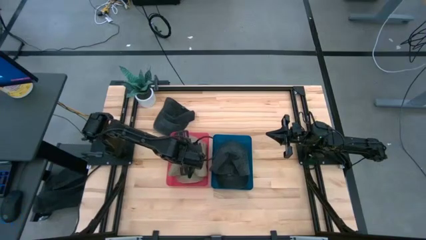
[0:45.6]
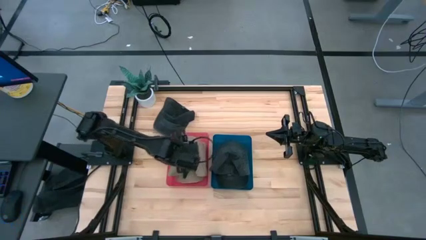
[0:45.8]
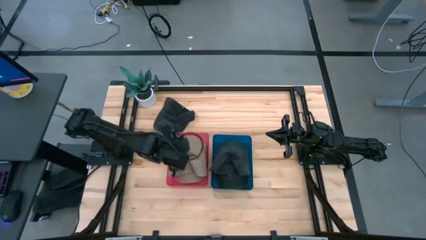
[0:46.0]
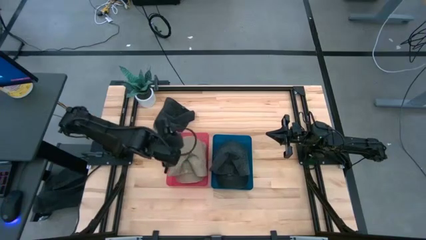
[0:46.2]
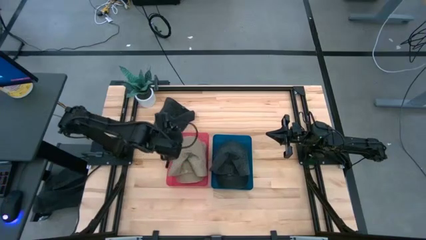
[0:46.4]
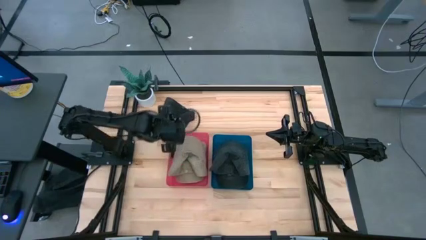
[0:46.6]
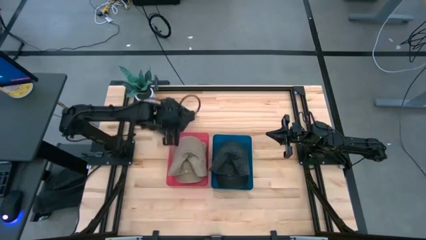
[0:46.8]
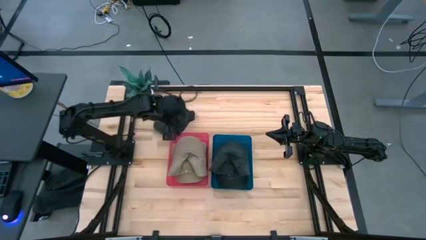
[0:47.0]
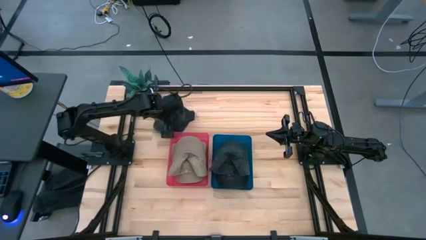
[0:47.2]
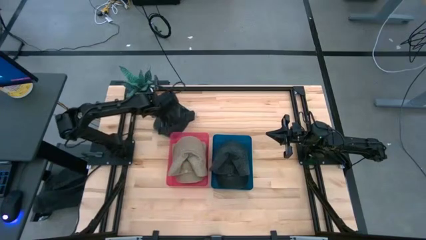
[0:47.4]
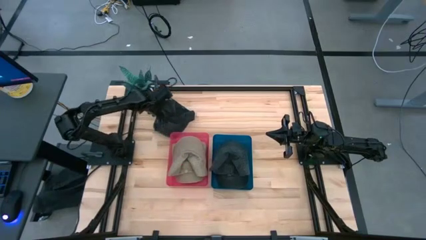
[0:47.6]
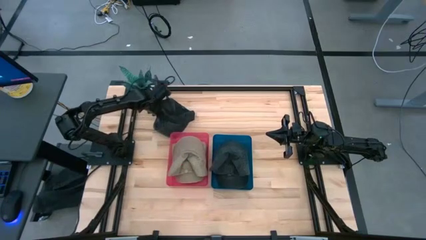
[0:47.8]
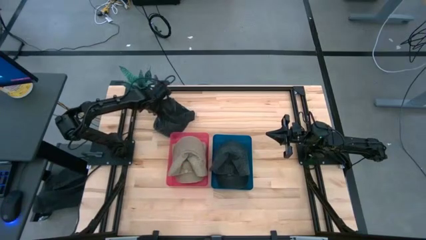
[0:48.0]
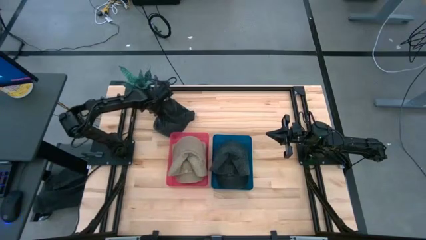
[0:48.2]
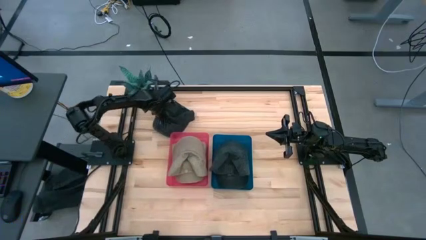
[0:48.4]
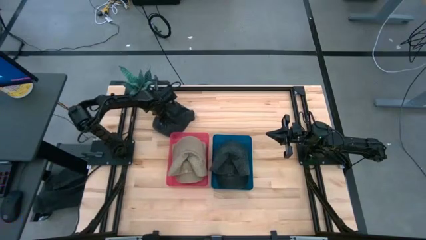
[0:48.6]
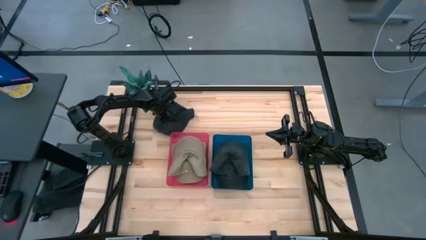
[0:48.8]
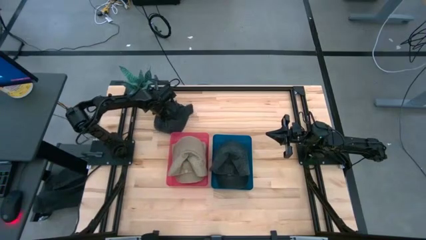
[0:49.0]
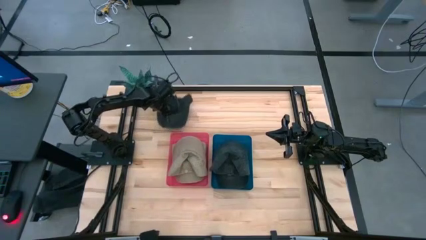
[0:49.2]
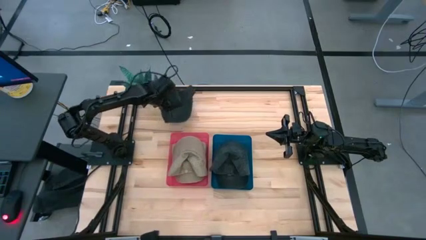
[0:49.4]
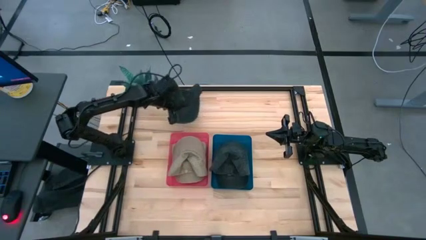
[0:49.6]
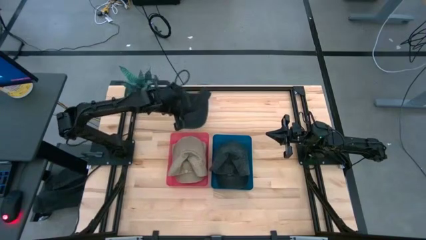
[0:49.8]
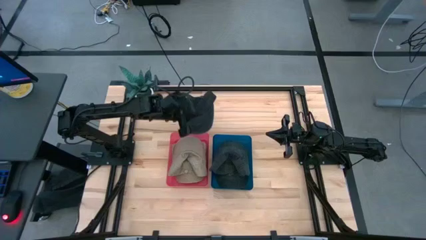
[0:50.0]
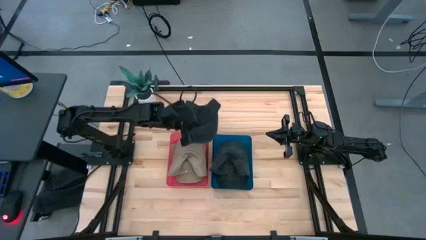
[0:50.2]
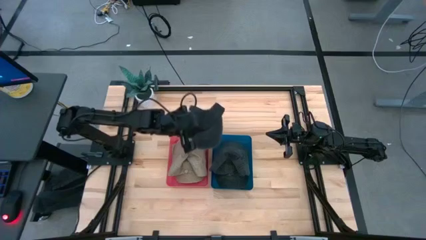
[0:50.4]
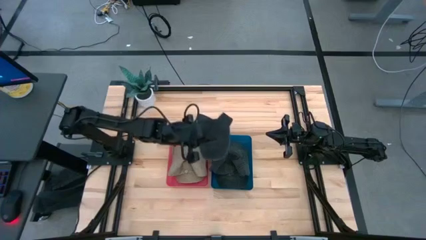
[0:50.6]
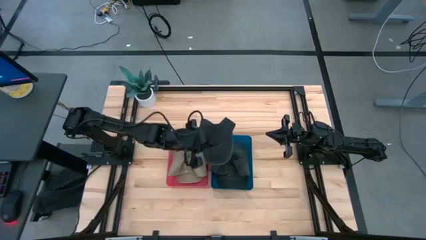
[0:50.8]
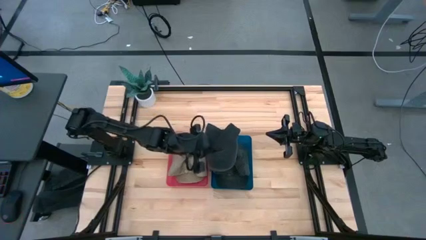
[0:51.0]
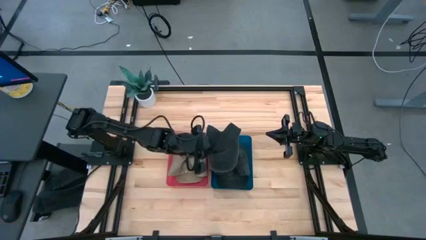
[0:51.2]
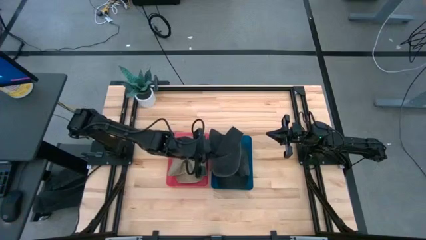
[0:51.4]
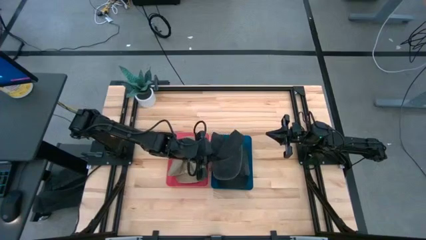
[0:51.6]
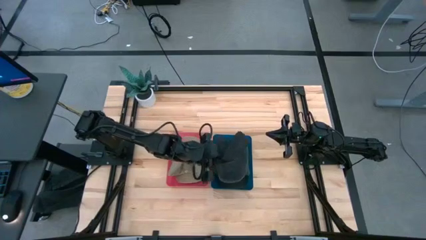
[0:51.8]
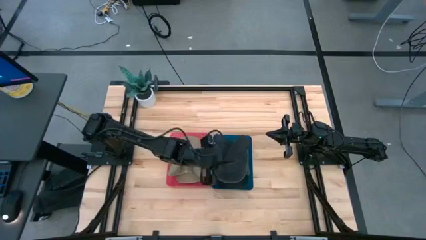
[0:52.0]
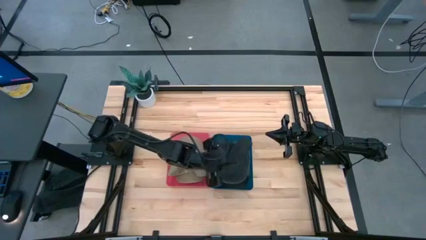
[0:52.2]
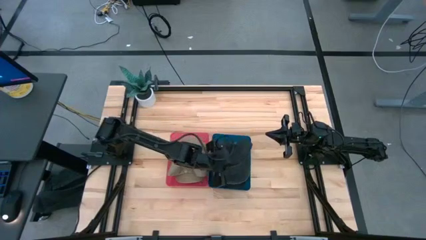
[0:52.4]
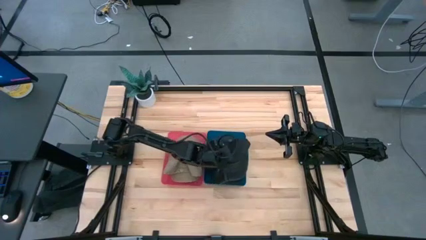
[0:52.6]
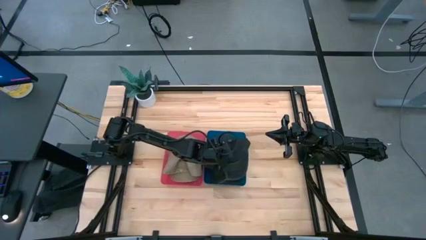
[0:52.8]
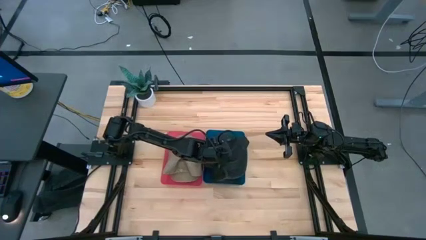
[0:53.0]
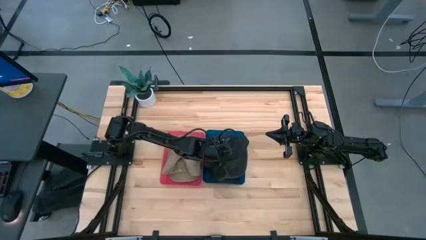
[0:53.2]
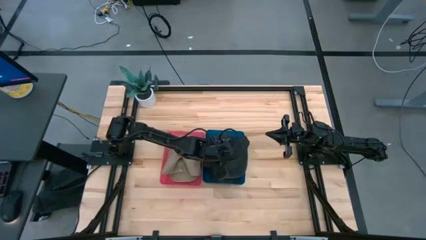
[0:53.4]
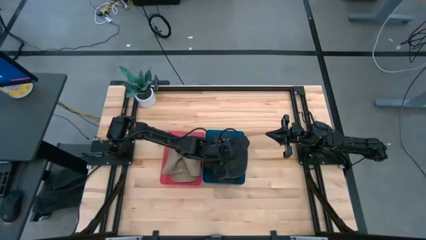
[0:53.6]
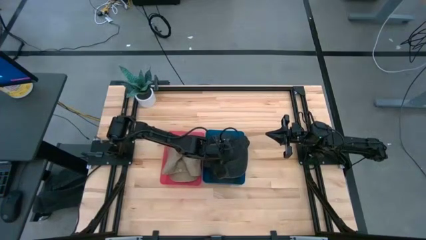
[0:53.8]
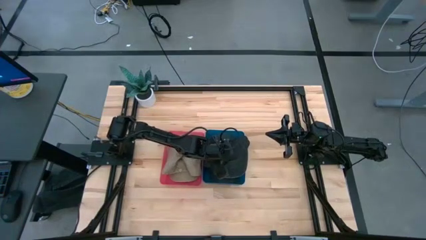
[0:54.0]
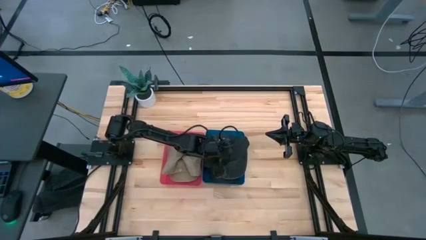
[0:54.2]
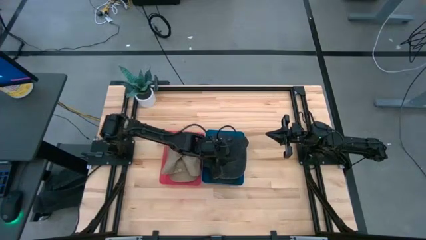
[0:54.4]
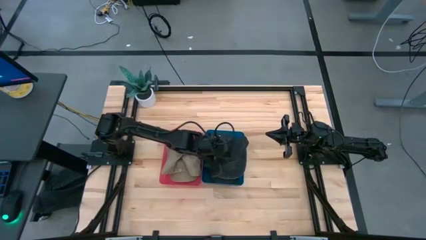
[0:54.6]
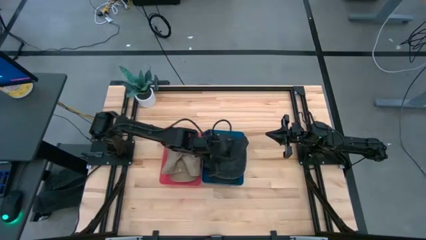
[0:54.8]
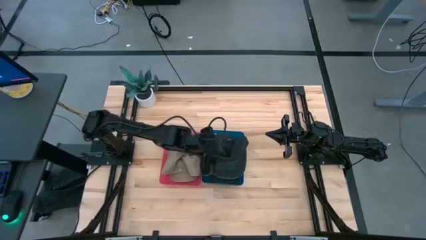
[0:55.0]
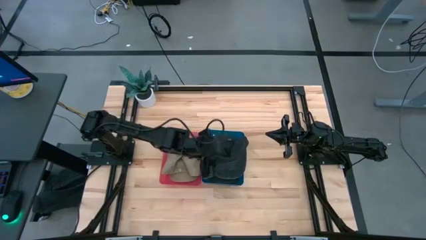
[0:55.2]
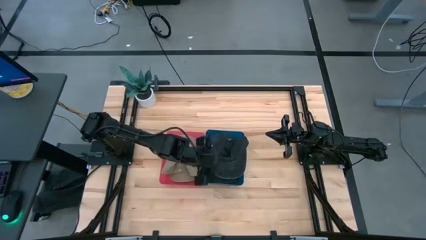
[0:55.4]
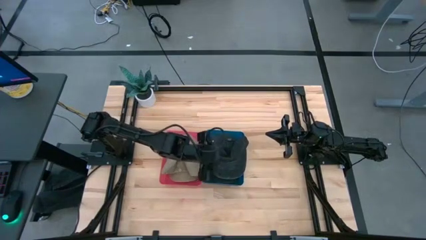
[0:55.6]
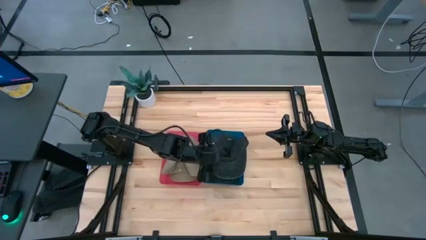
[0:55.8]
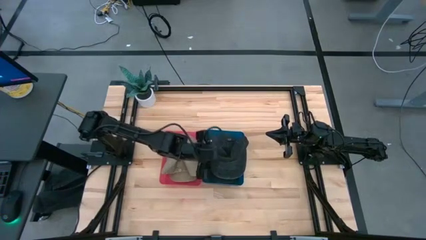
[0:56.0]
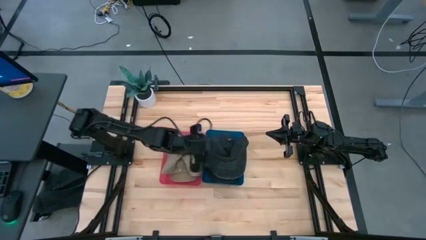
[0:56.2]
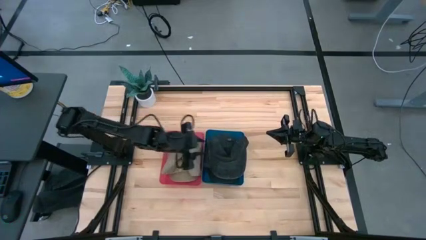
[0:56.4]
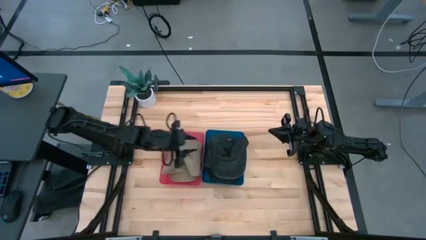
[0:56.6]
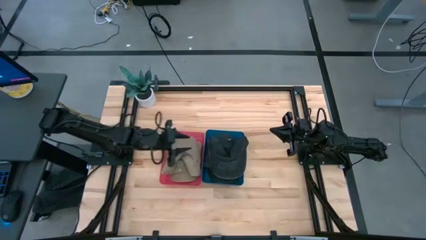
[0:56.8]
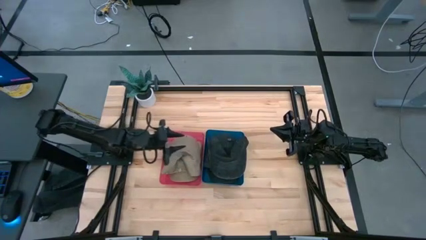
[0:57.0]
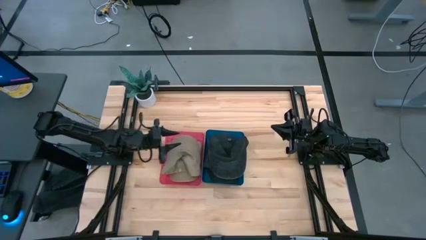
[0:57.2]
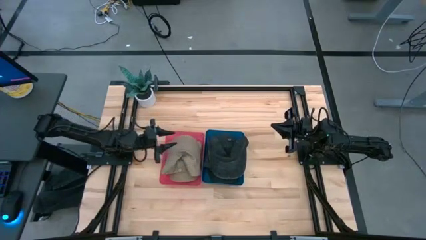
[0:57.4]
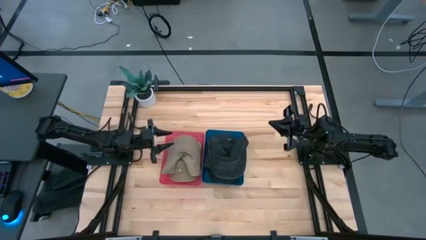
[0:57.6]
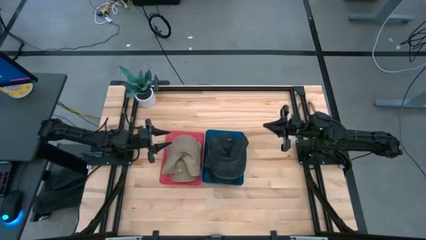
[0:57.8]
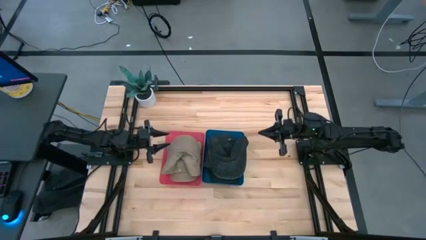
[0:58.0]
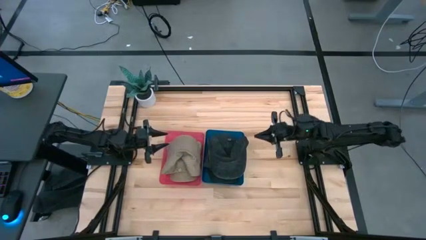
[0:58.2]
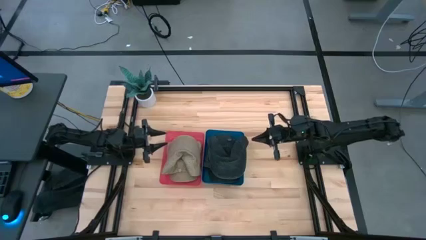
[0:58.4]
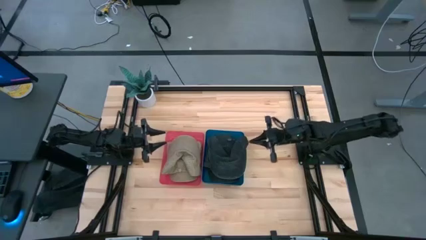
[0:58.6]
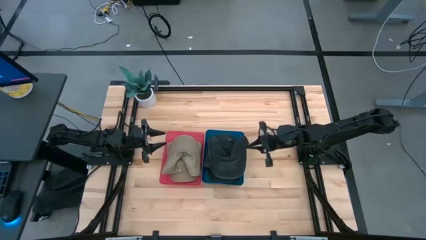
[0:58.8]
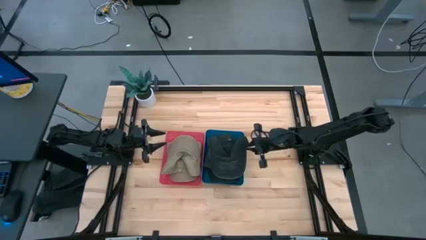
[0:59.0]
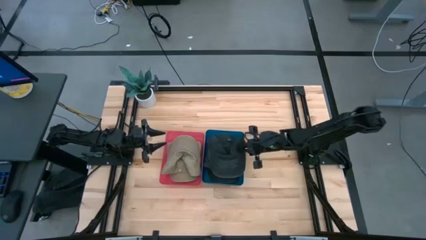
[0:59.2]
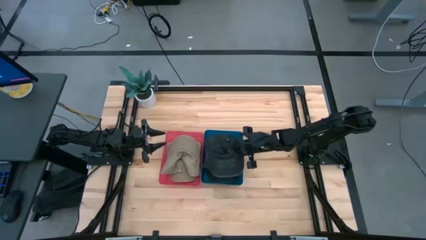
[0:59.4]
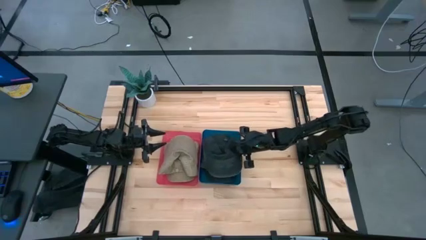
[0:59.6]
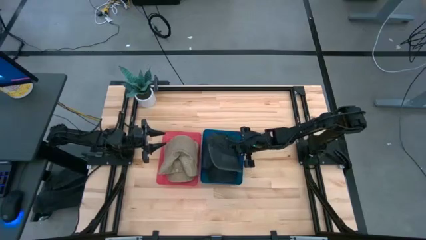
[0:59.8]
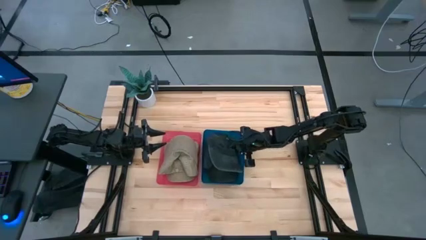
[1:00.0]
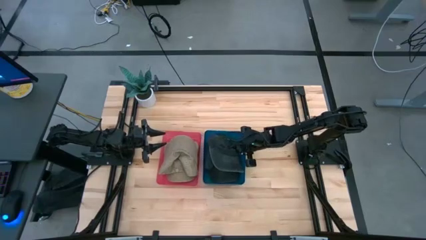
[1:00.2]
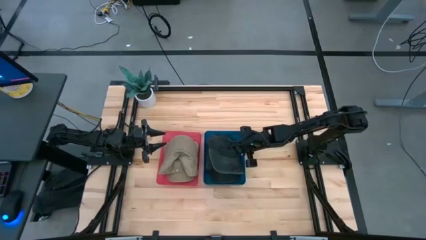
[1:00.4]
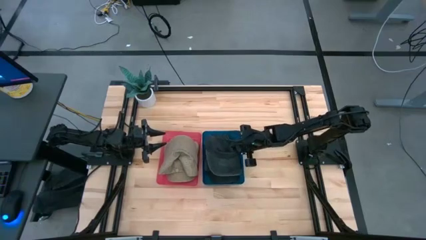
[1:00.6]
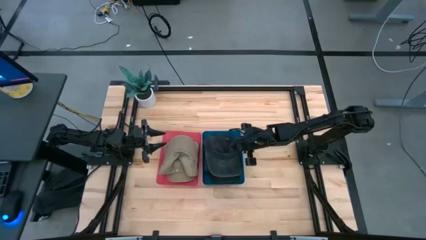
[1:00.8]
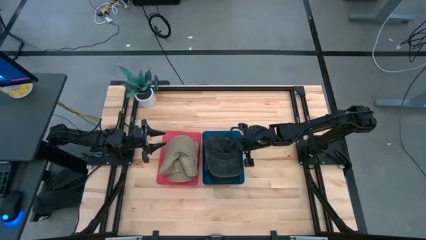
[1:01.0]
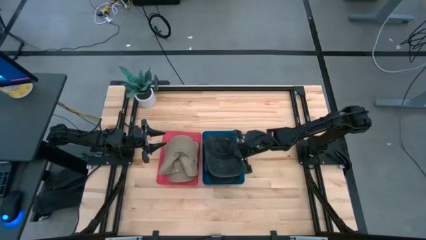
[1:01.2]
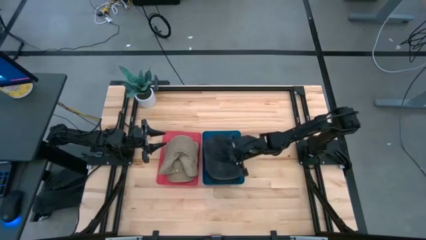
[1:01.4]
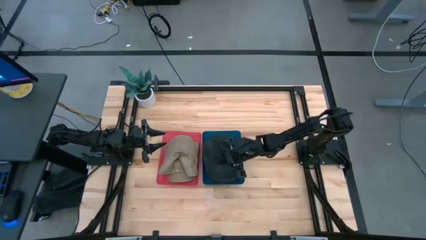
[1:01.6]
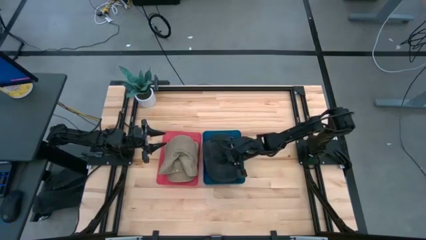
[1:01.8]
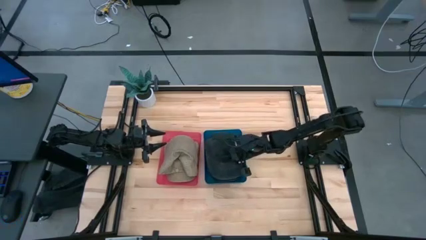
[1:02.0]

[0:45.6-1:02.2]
Task: Pick & Place hat
Put the black cap into the blue bin
